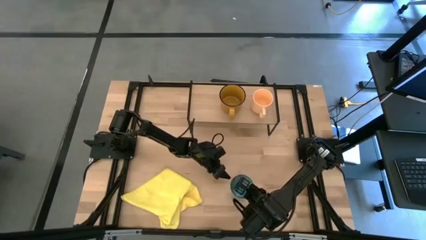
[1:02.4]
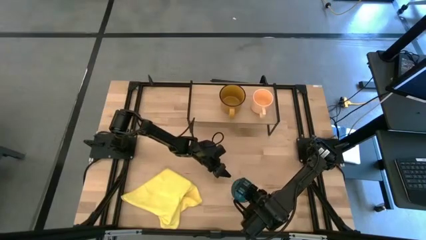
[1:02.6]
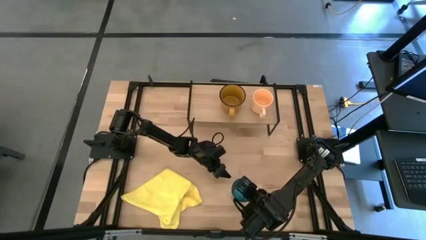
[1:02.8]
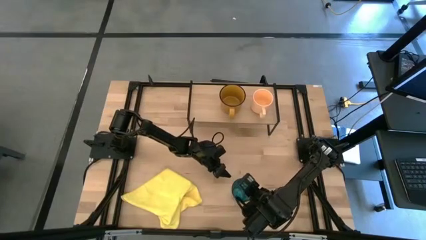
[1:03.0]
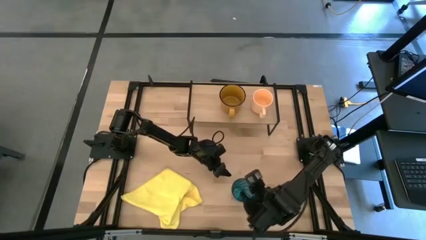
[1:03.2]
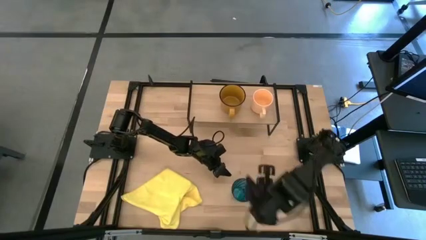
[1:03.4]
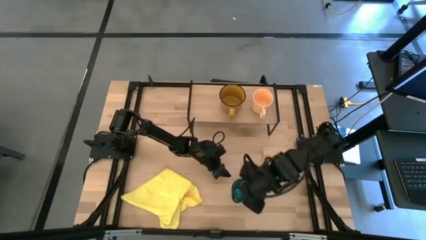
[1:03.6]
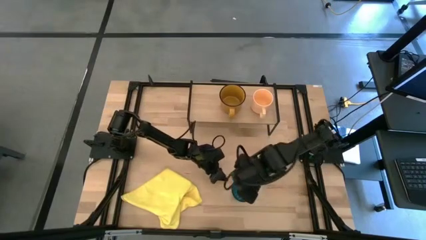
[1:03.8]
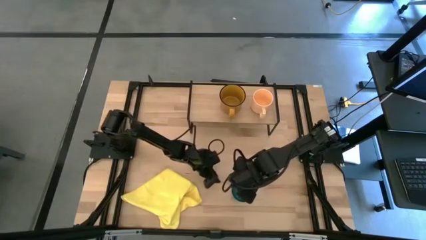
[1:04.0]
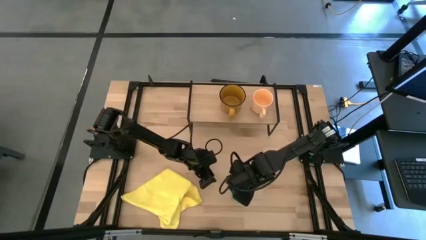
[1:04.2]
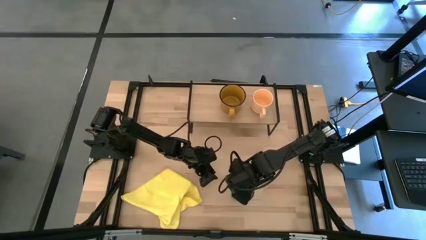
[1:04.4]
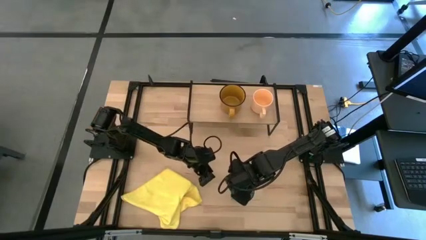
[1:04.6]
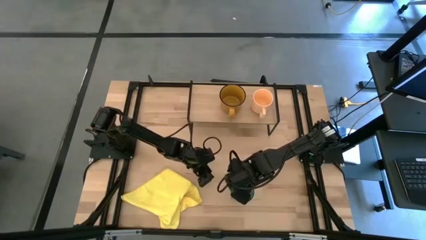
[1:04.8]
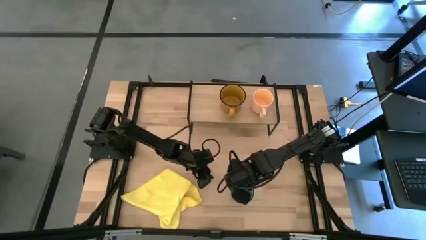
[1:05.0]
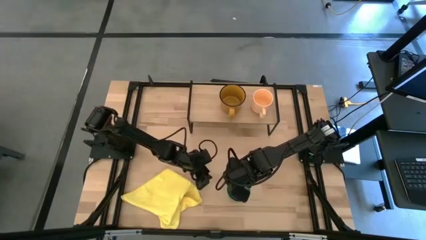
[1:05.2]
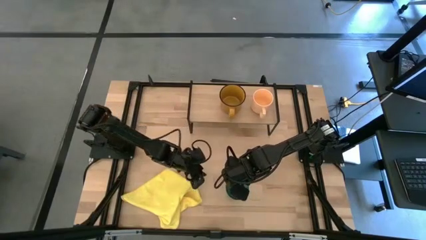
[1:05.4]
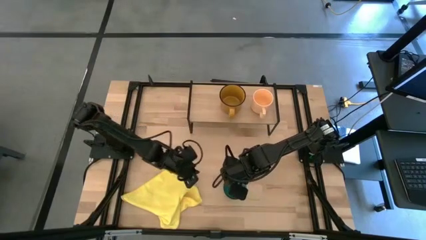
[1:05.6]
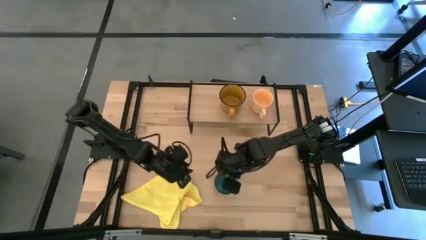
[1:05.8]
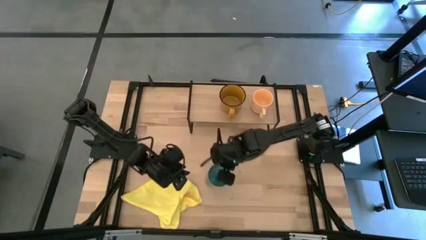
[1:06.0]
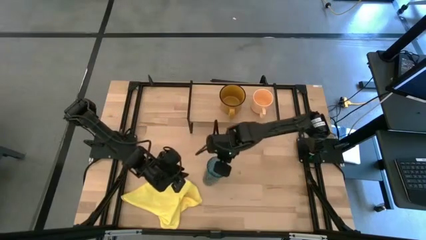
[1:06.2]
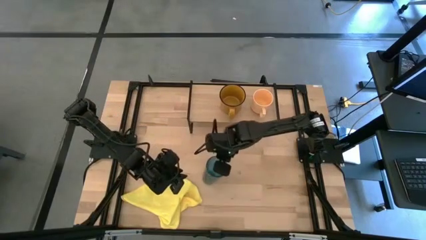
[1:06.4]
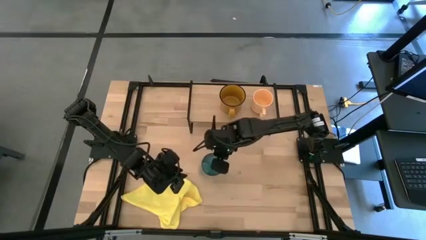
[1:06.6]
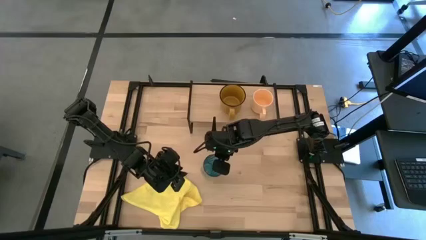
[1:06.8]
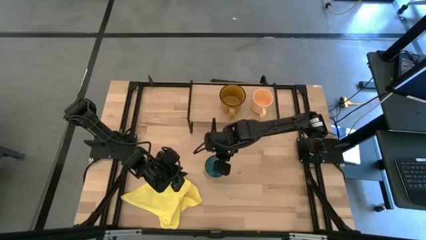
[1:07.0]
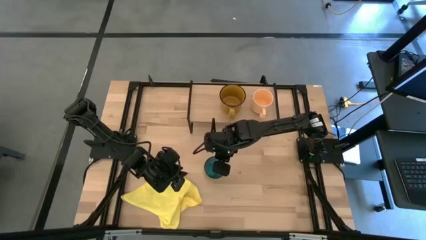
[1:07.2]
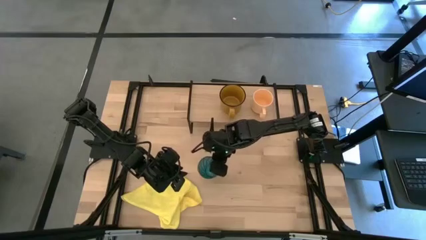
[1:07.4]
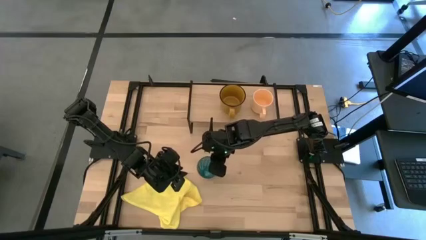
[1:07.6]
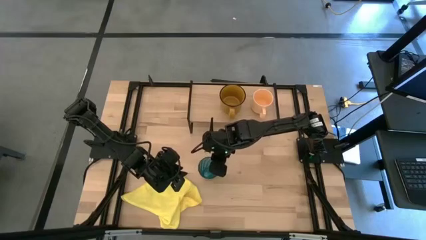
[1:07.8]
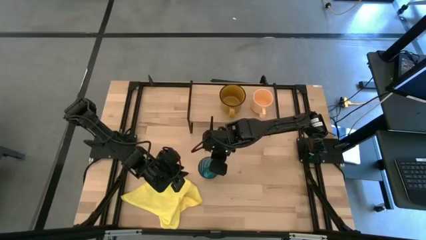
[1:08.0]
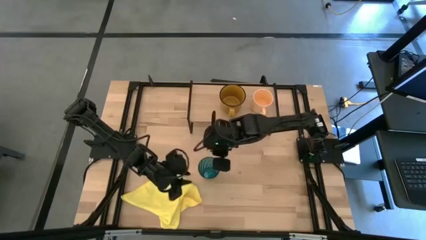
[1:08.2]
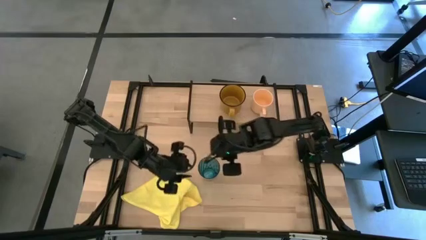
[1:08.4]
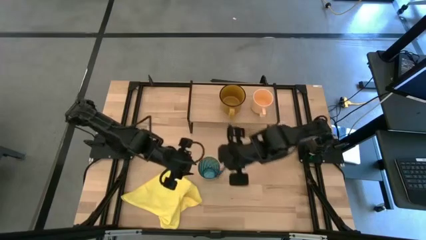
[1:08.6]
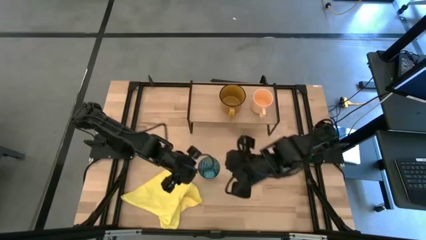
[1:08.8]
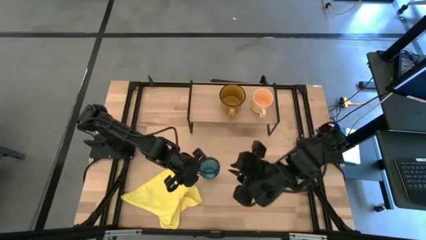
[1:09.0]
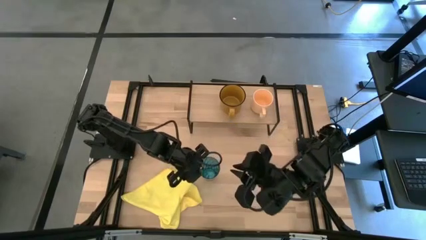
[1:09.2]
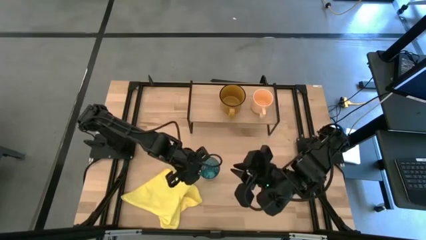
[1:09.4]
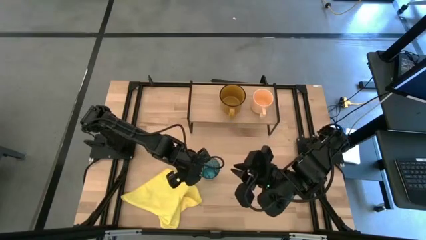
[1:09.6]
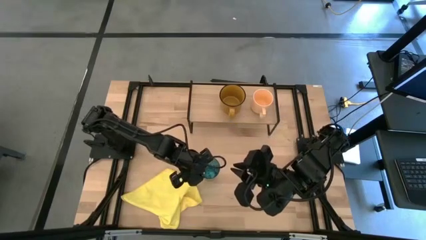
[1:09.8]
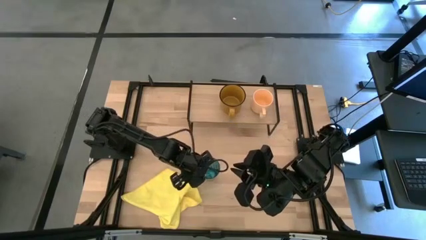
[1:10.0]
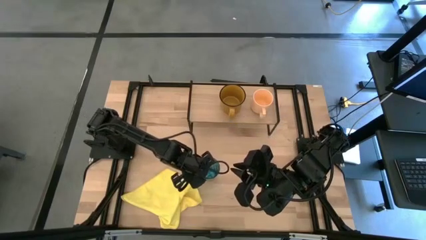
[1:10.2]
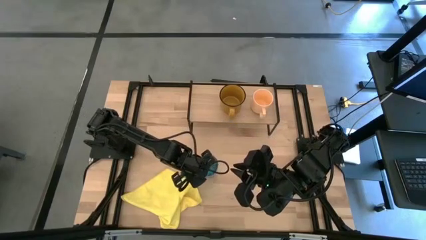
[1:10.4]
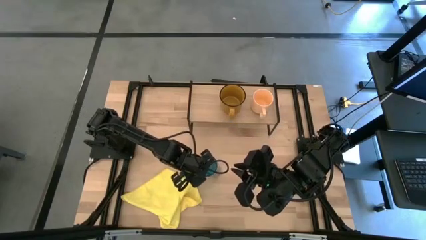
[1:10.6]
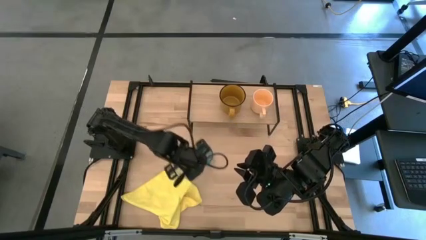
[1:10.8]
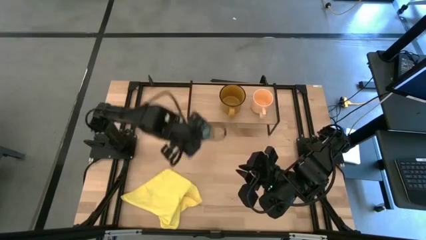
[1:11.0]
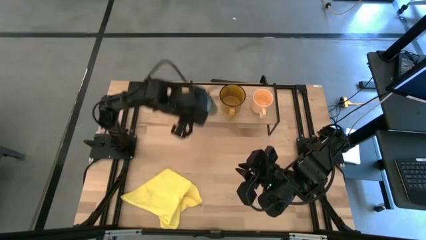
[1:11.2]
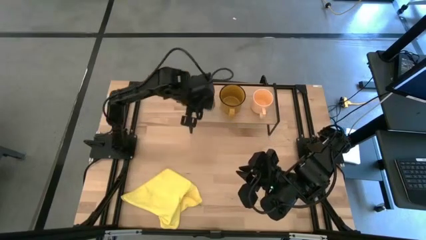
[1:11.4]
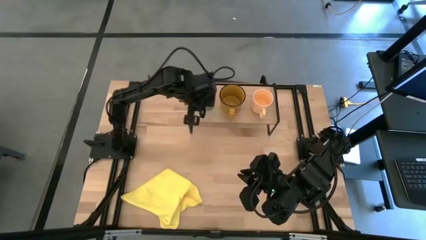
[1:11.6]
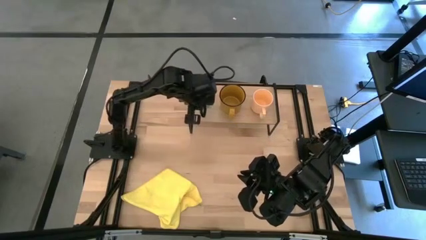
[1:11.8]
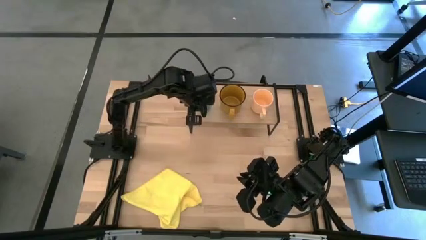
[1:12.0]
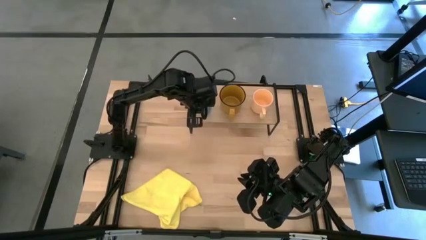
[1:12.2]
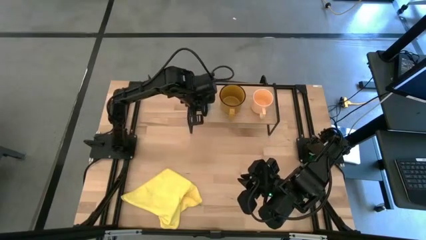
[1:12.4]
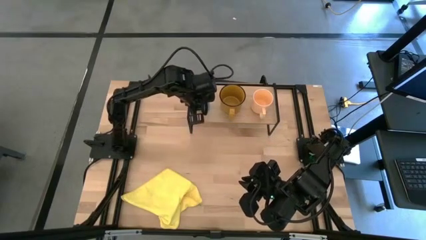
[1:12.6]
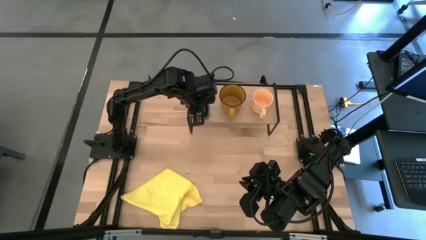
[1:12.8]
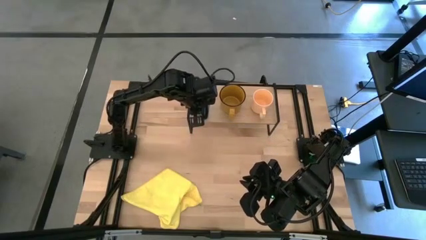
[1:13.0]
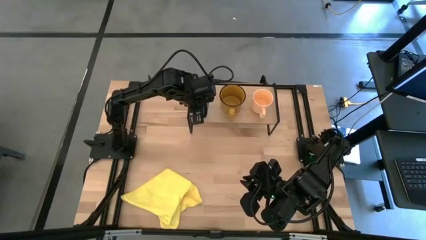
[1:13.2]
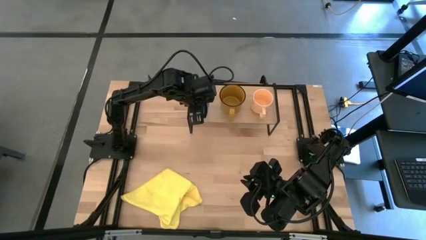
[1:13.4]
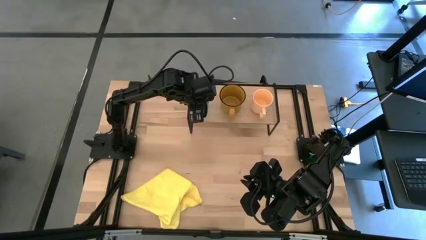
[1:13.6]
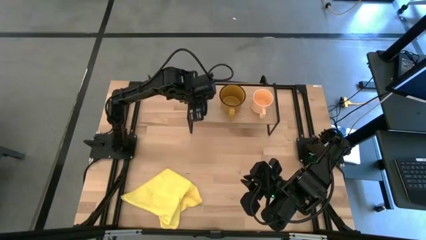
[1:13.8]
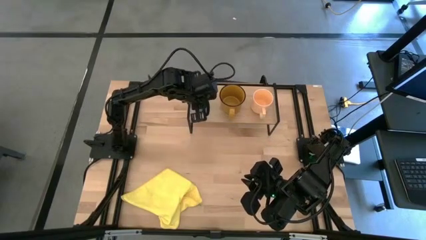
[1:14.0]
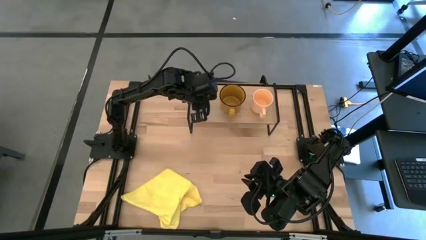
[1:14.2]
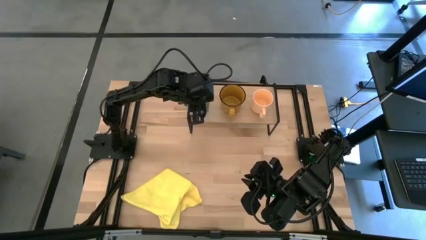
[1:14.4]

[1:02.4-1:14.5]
Task: Stack small to large cups/mugs on shelf
Put the blue glass on the shelf

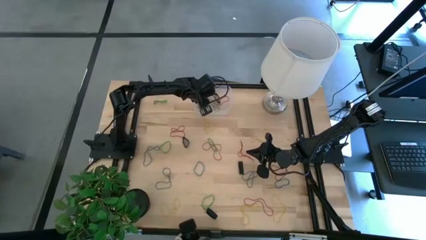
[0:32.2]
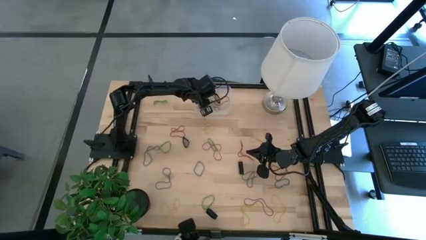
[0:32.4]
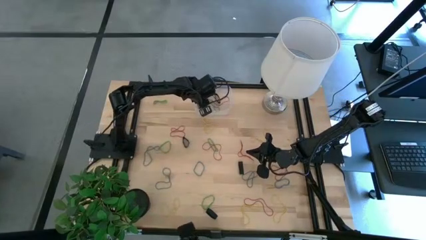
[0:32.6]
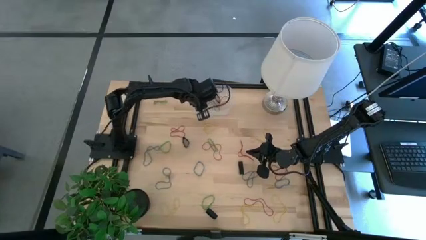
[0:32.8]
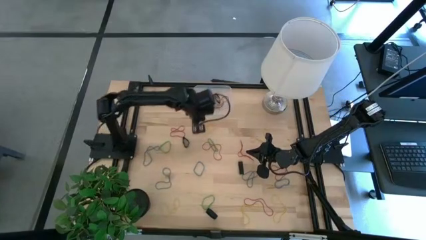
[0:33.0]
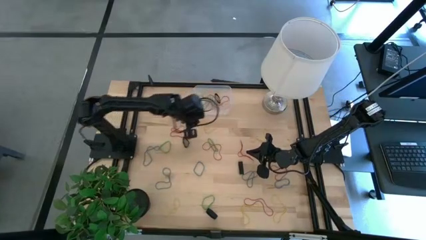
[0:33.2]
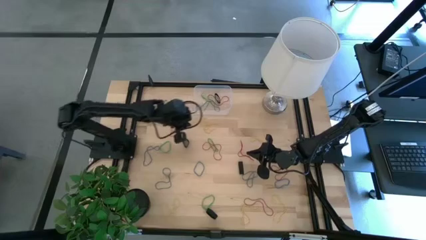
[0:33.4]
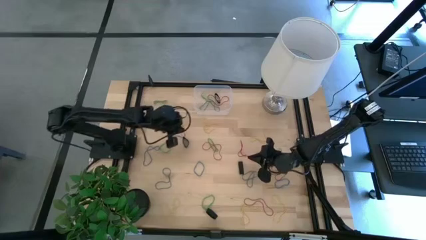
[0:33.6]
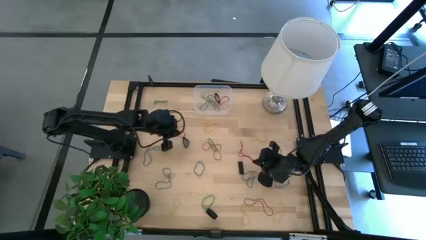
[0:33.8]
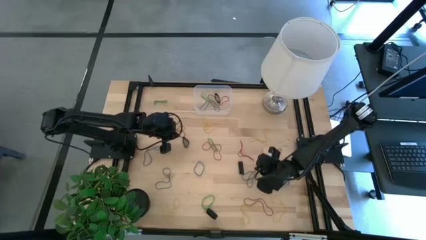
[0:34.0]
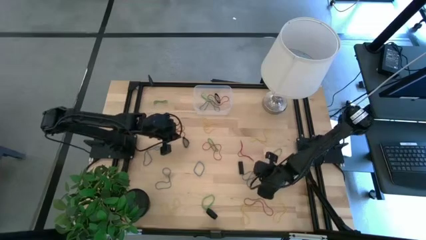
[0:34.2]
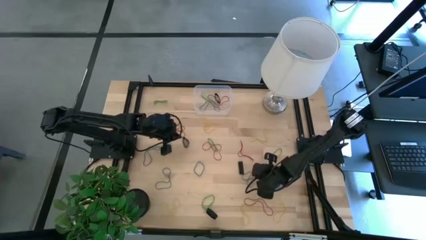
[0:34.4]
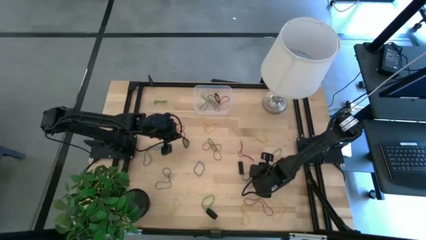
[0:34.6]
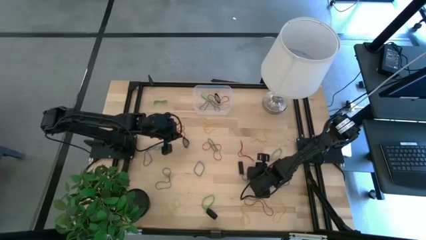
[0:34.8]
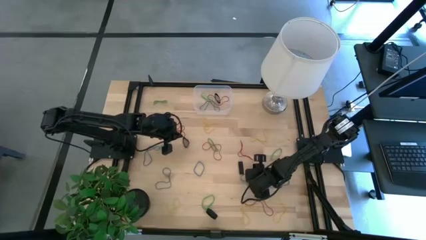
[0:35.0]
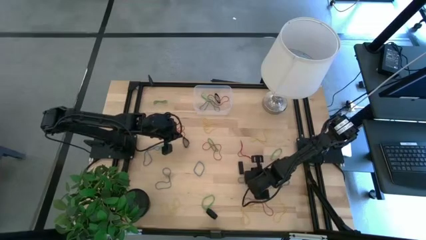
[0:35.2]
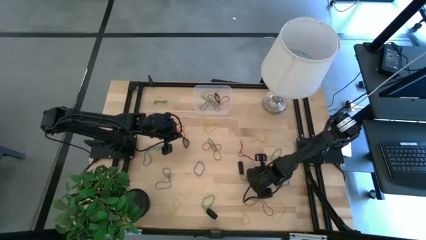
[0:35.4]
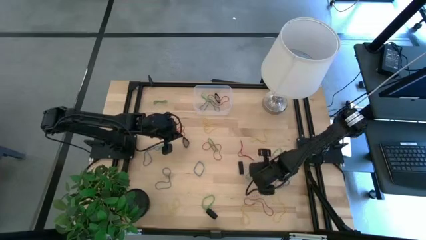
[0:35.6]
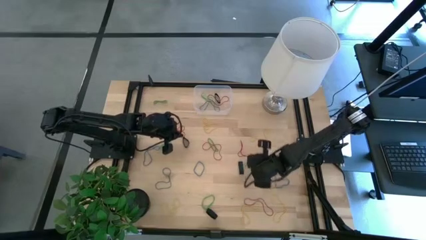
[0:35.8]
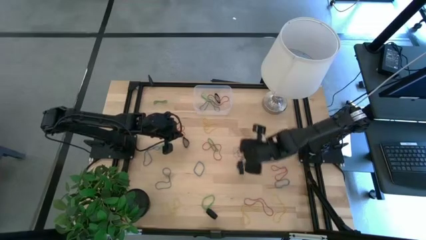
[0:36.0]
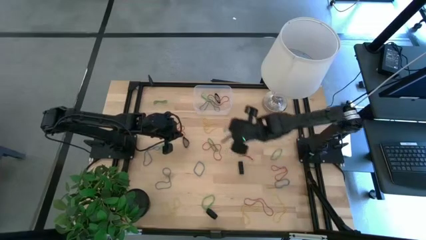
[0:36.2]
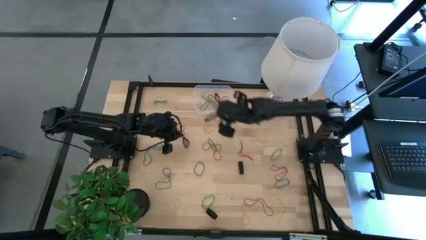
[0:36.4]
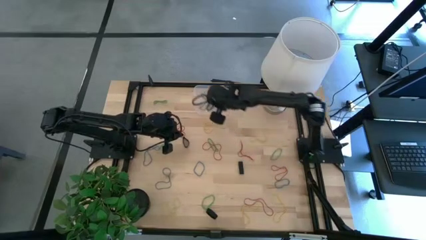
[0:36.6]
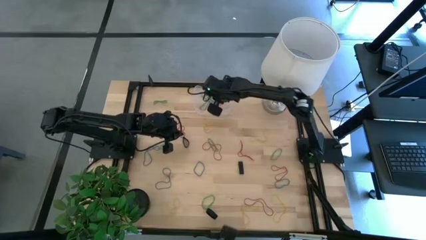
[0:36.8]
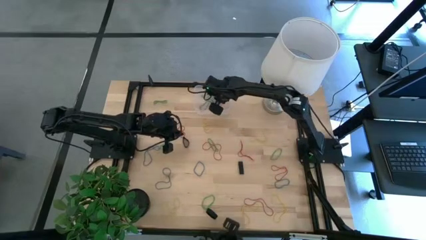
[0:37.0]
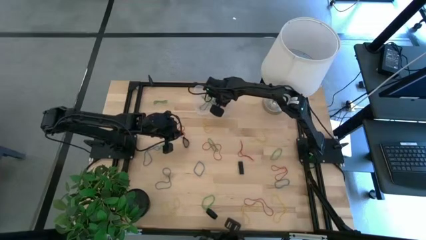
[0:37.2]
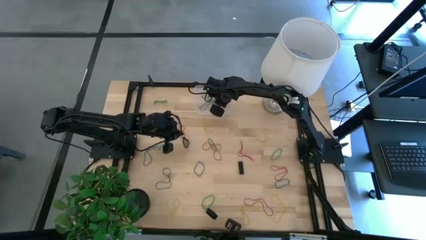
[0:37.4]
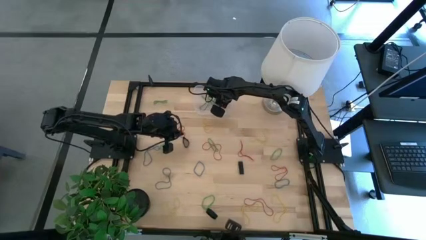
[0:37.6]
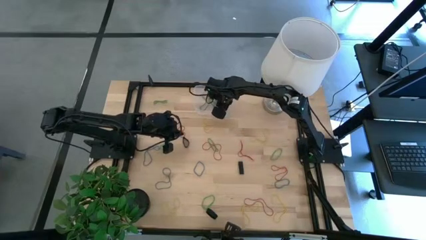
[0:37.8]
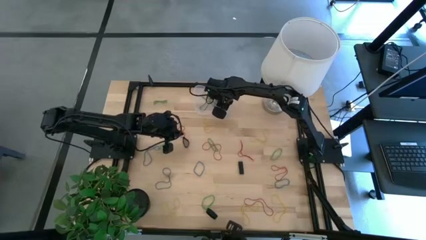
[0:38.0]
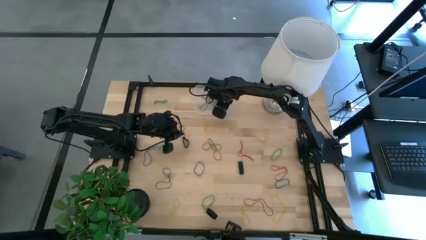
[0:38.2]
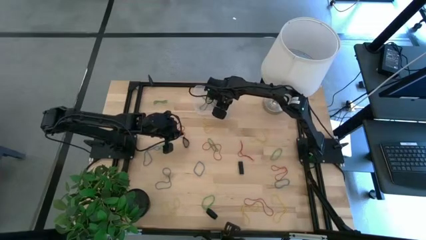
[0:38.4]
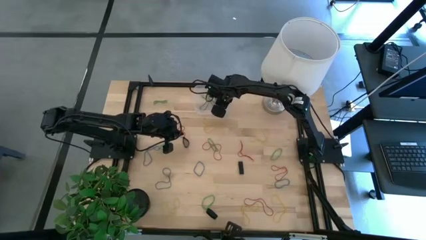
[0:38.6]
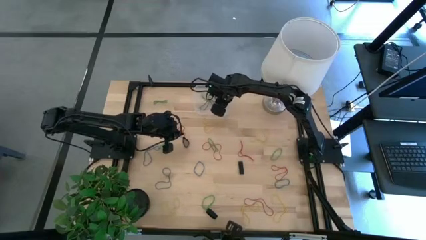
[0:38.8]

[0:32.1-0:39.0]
Task: Pick and place rubber bands into bin
Put the blue rubber band into the transparent bin
